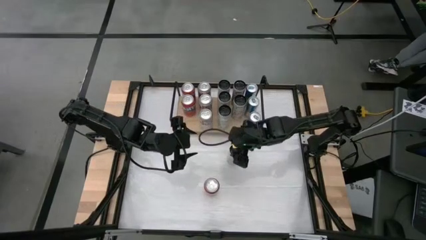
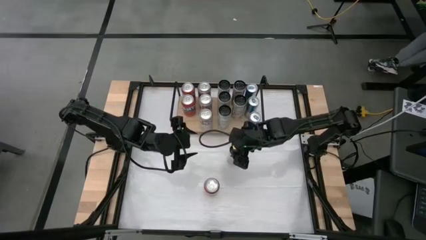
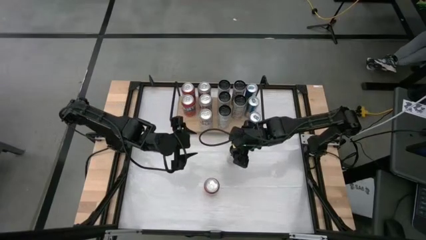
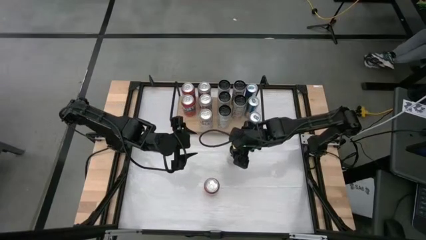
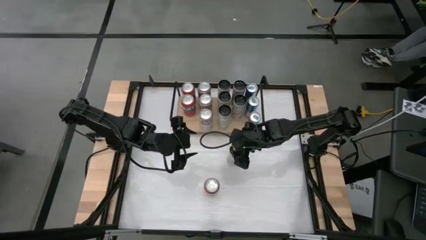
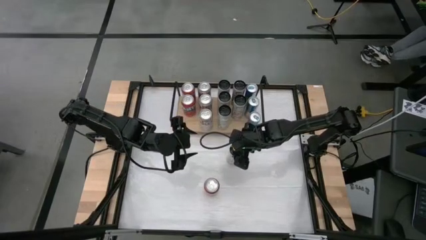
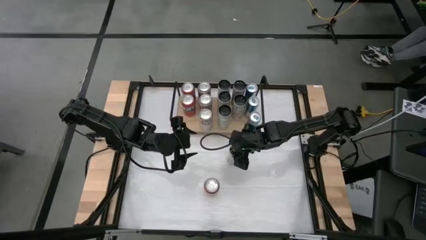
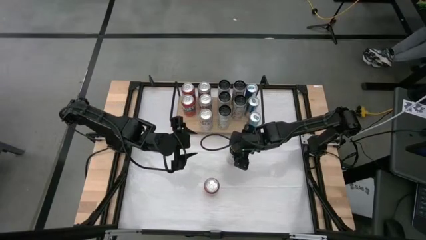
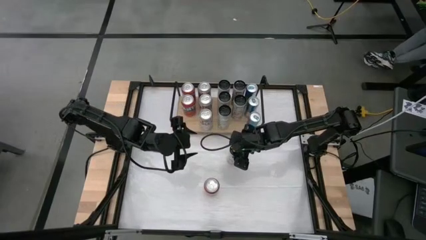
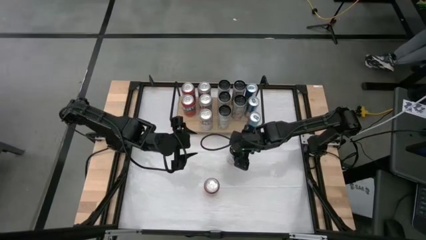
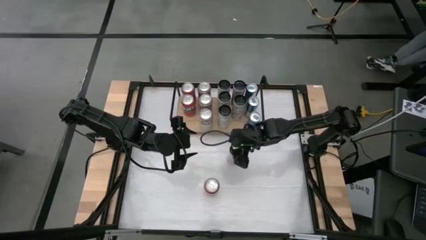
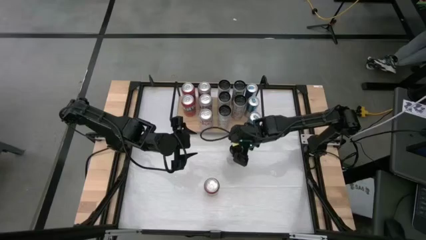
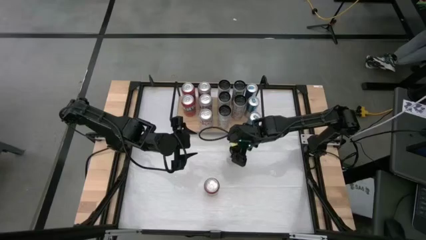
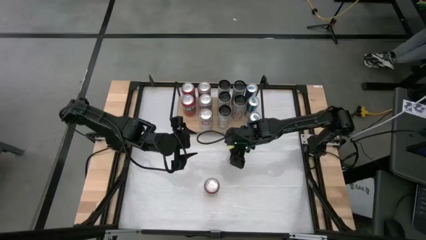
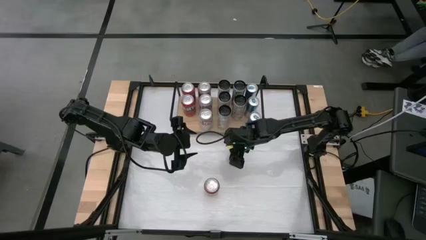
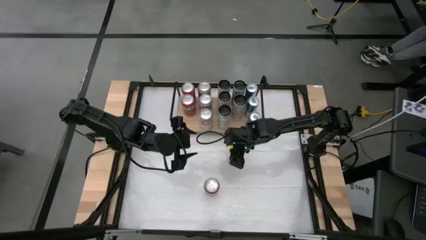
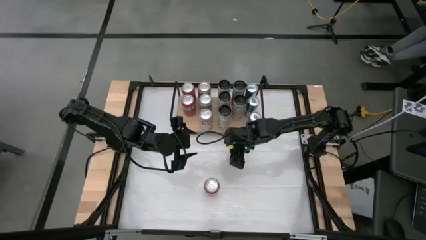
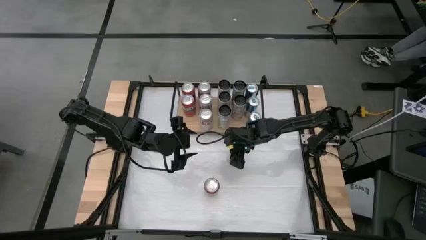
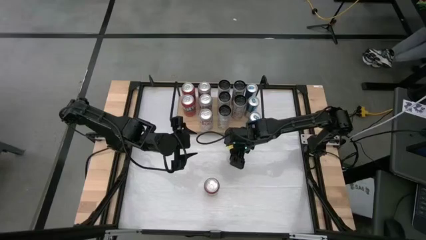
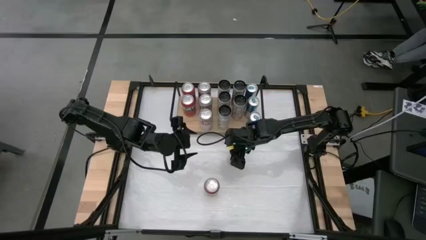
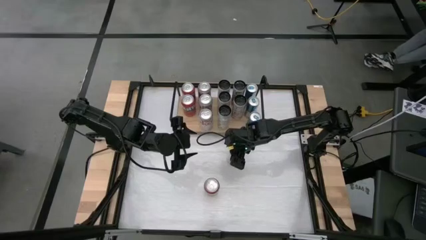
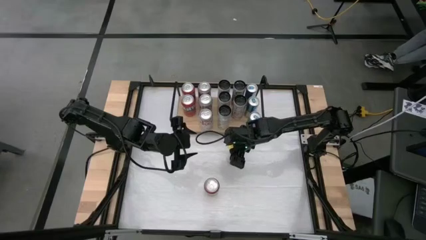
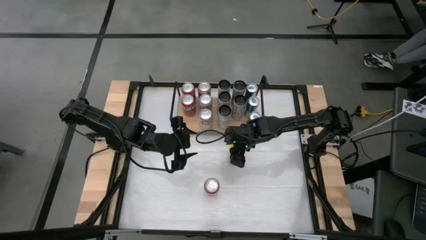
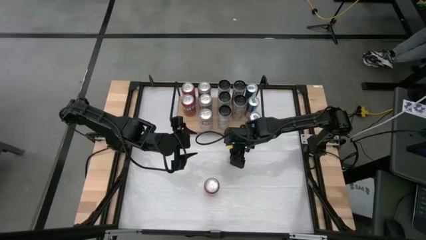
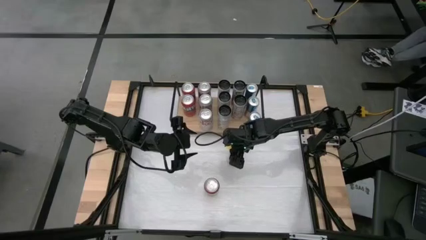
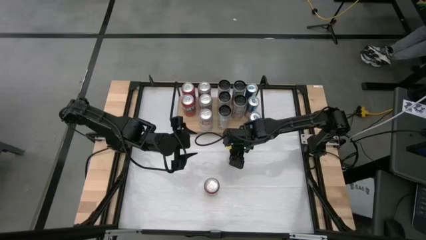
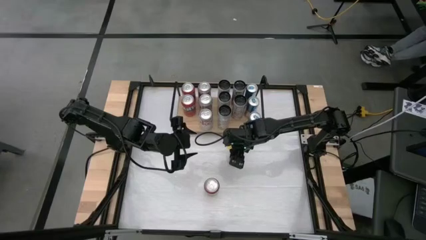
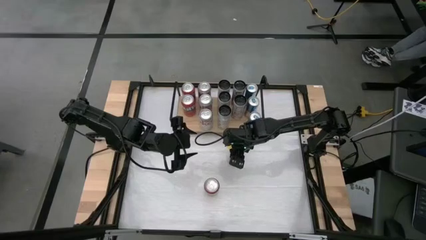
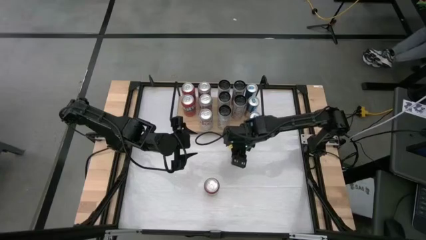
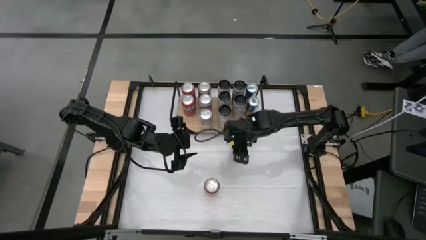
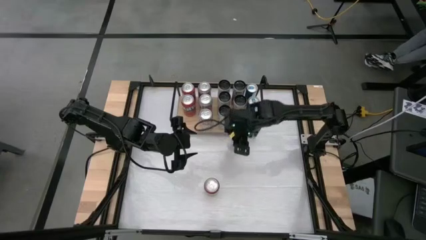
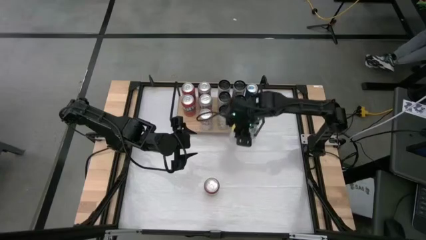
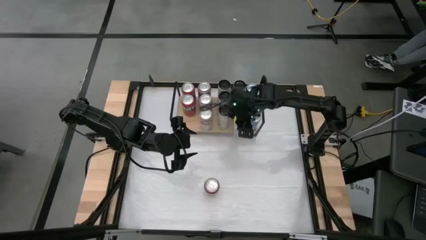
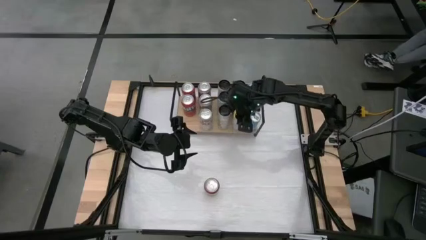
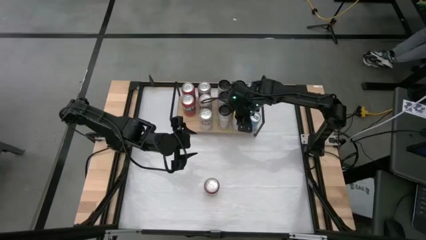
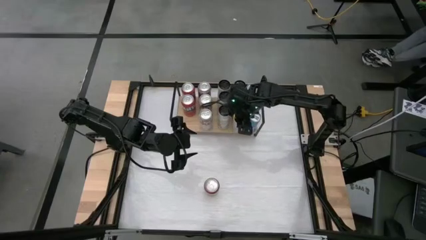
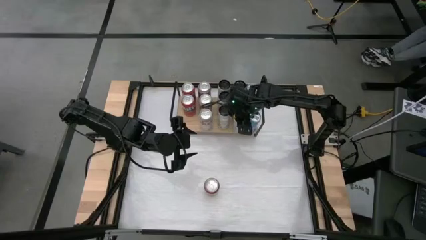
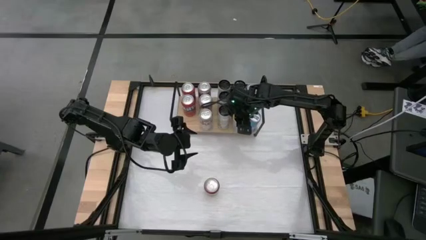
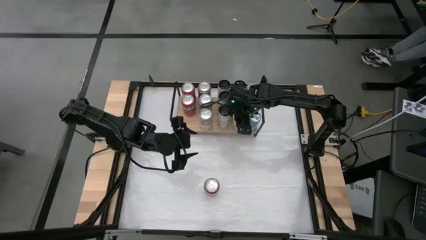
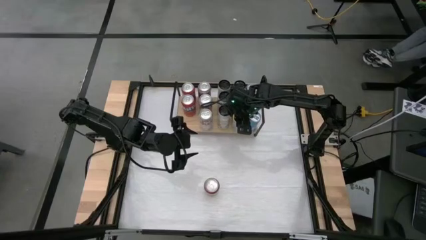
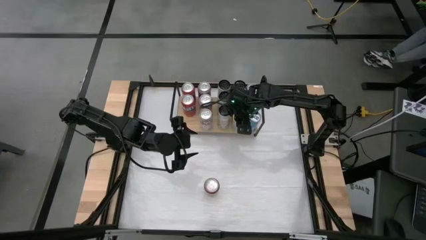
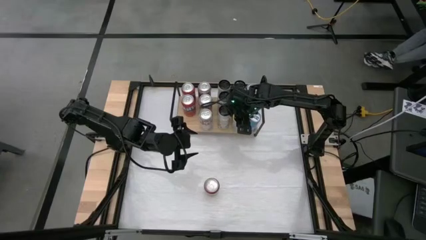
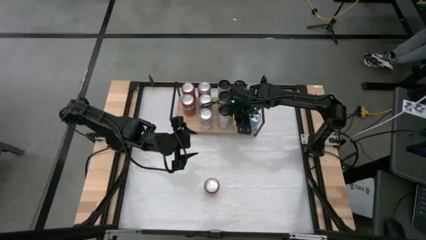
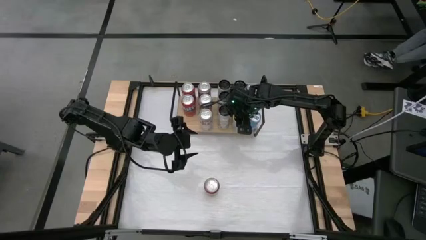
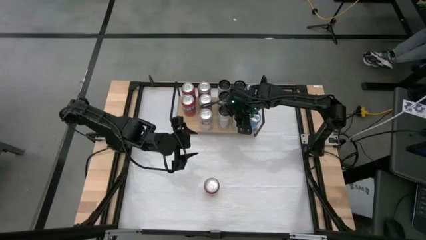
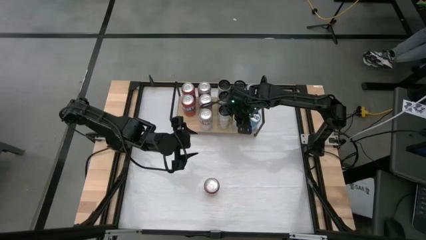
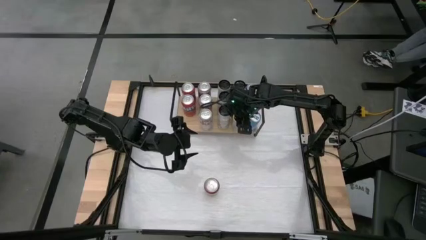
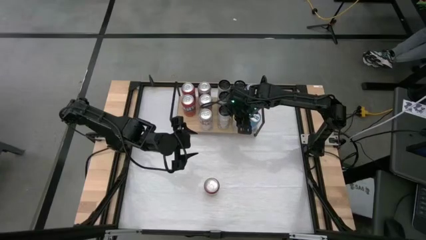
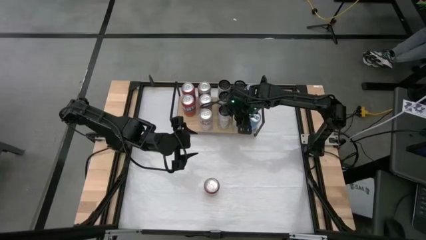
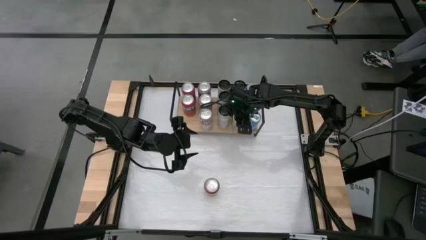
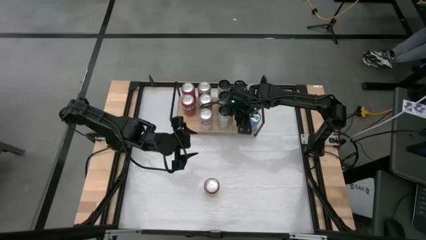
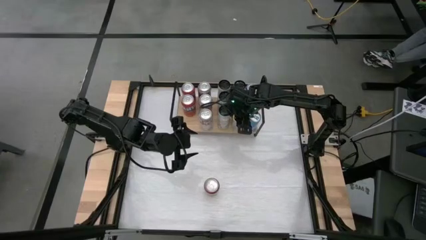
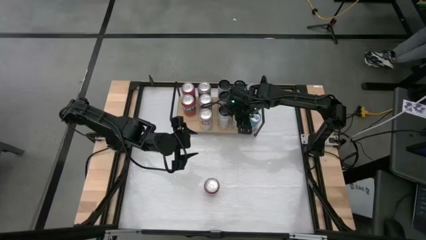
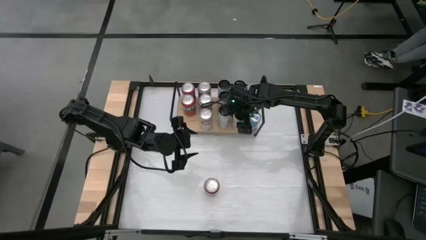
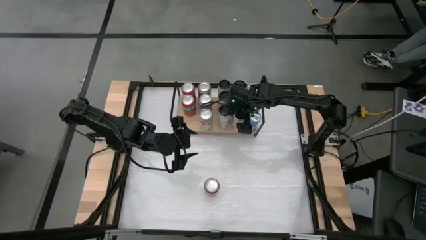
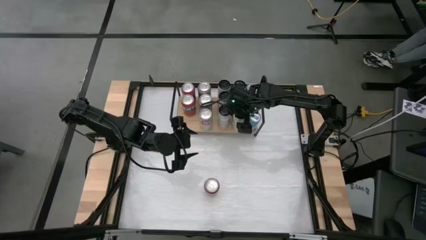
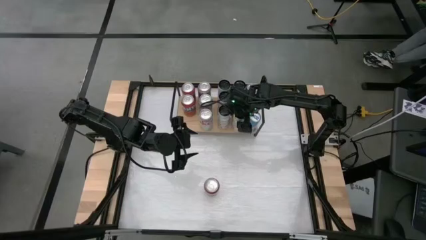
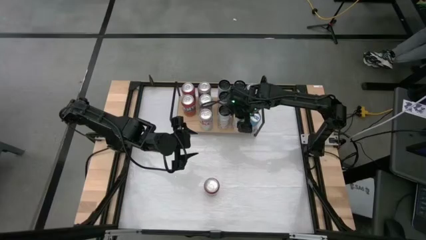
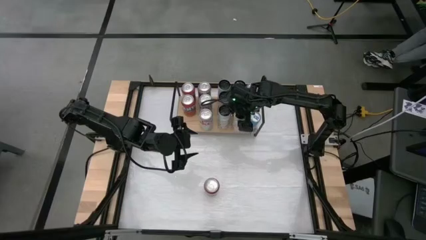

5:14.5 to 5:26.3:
Task: Place canned beverage on shelf
Put the white pink soda can onto the shelf aligned with the other white pink soda cans

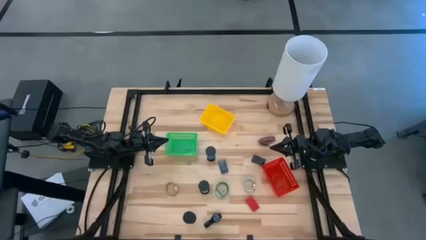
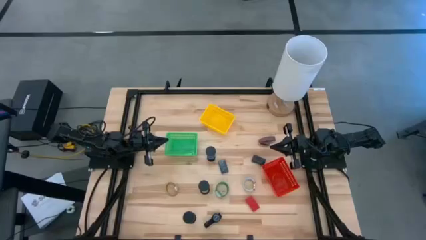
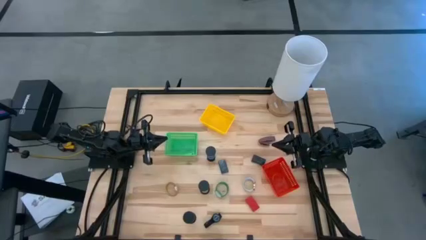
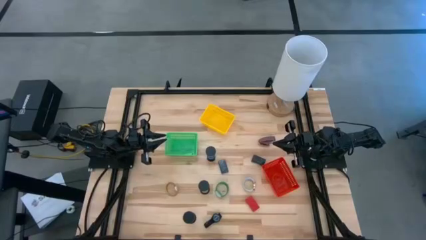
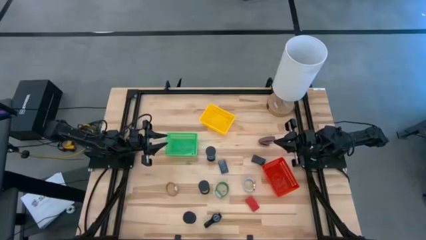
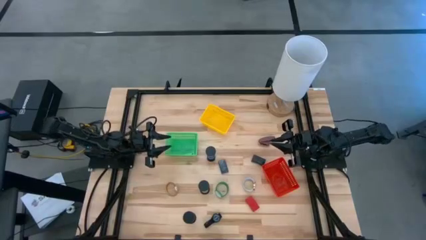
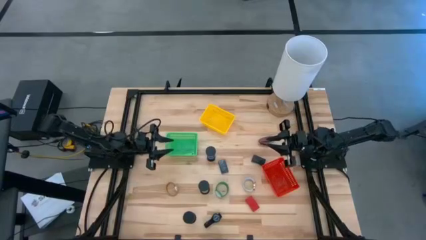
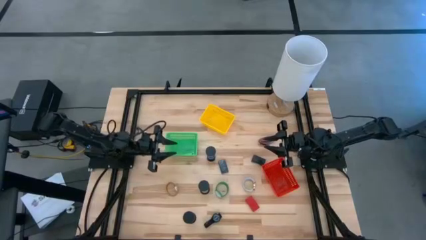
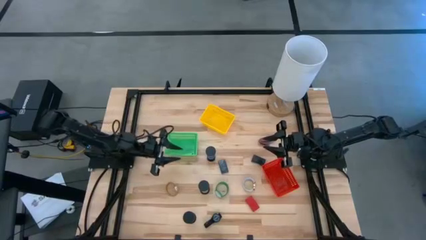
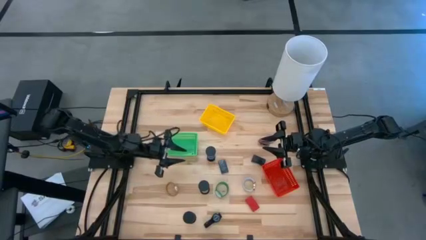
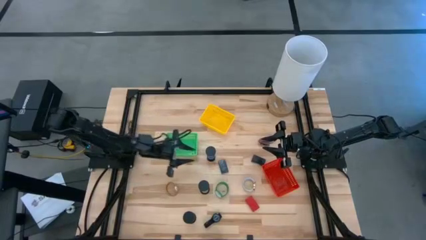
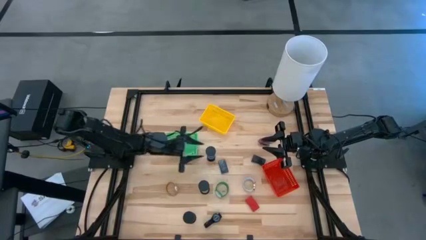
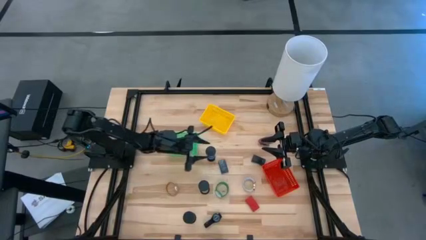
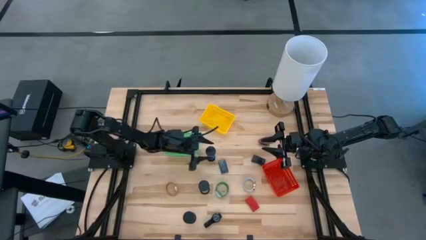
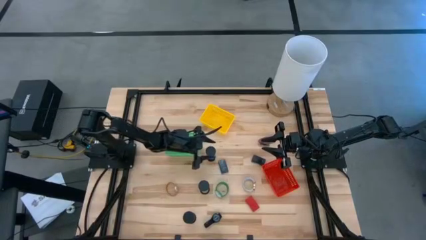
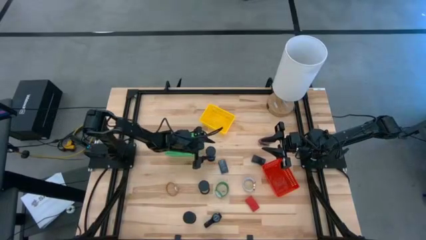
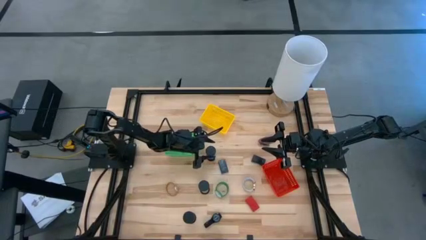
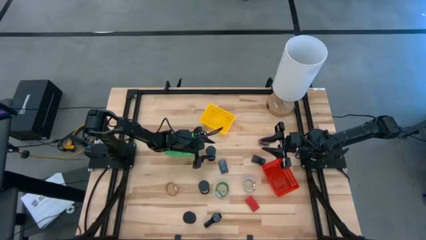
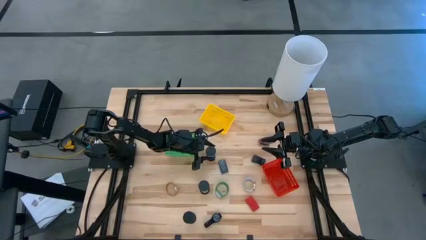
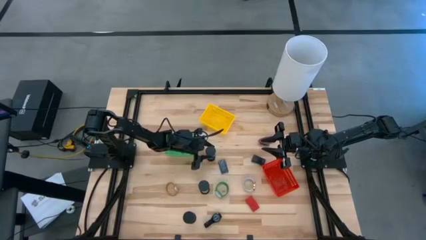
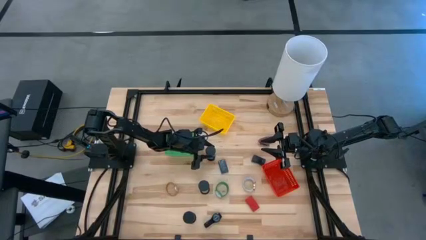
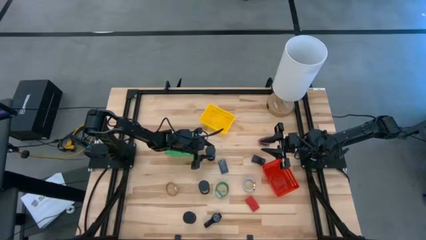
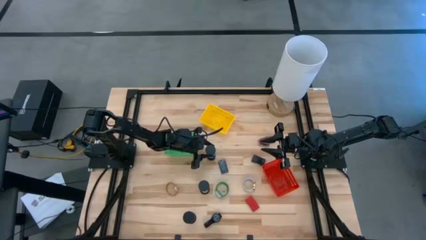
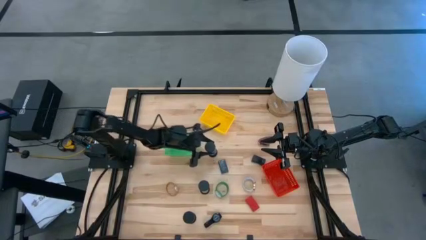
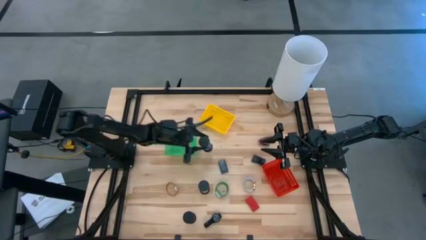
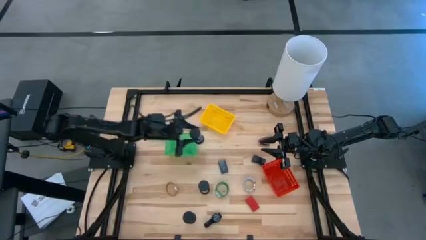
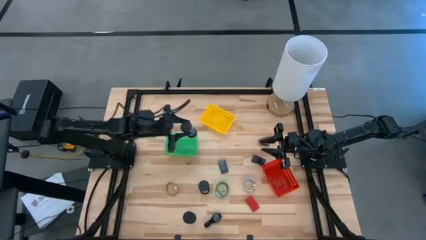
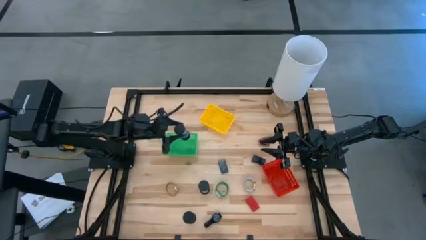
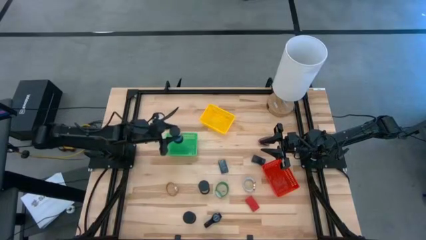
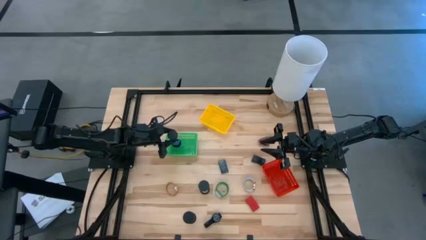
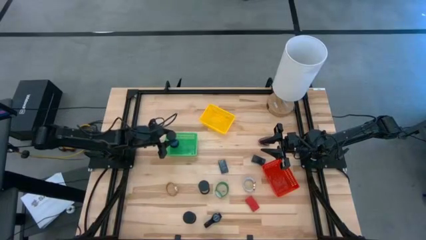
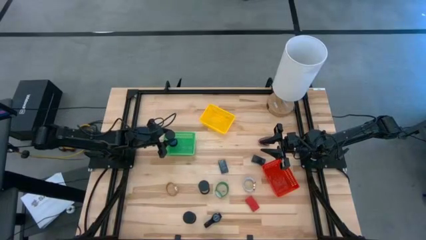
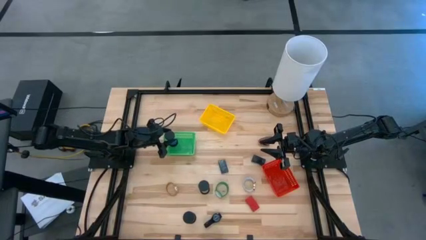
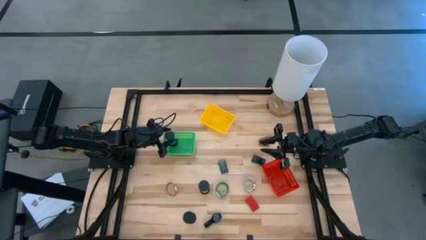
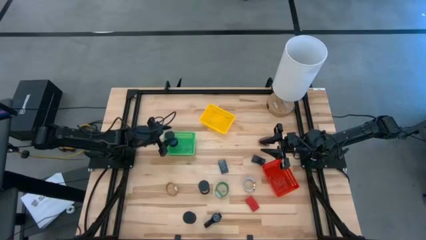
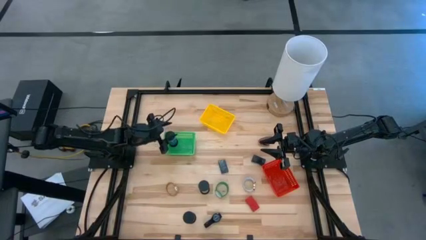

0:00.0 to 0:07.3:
Task: Pick & Place Office items
Put the blue hourglass into the green basket
